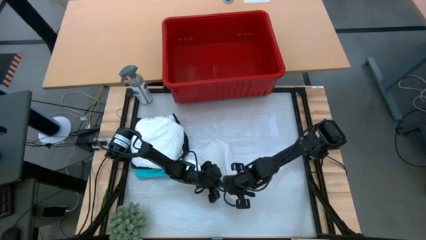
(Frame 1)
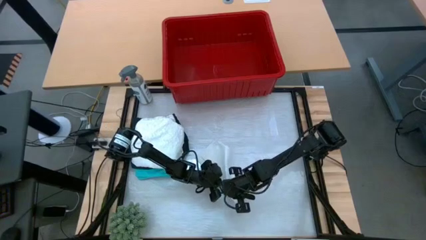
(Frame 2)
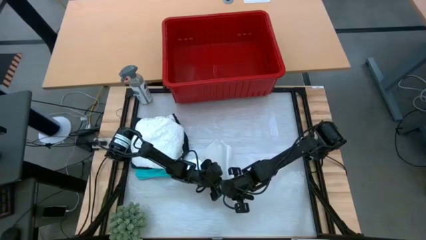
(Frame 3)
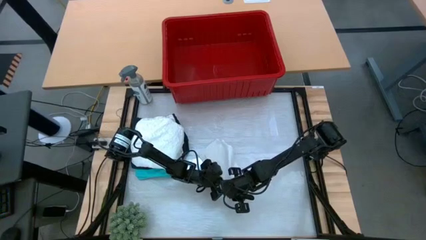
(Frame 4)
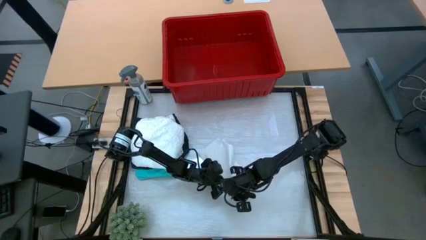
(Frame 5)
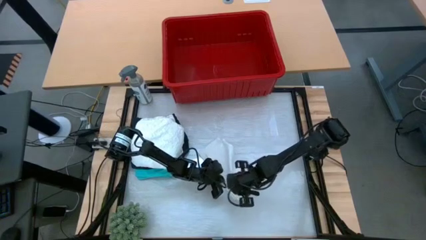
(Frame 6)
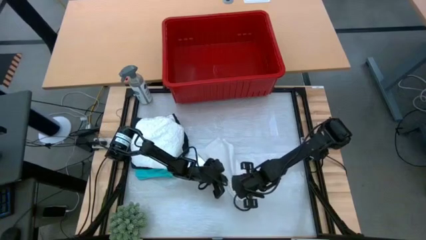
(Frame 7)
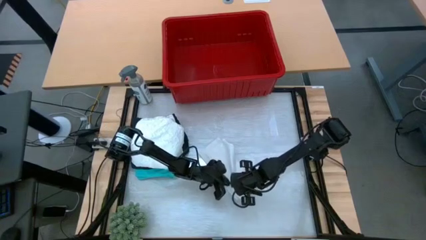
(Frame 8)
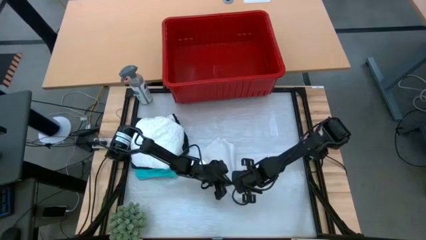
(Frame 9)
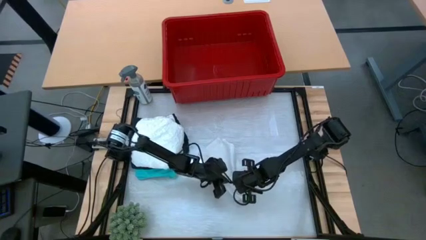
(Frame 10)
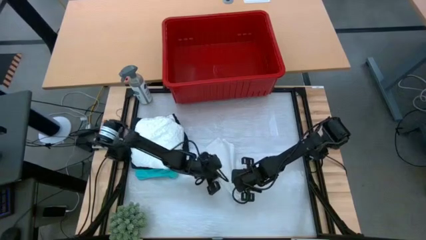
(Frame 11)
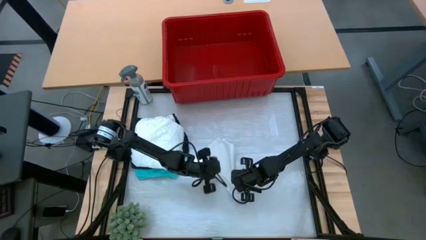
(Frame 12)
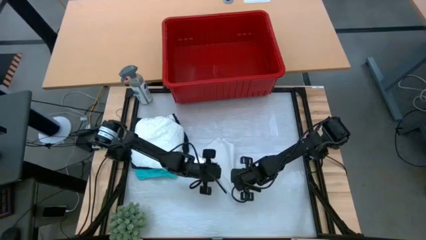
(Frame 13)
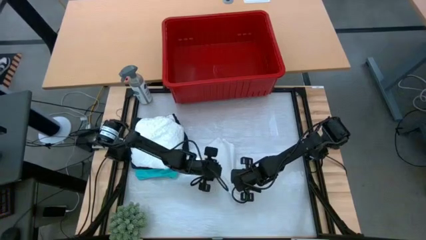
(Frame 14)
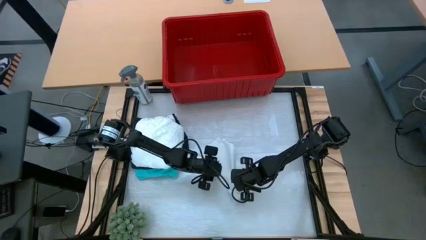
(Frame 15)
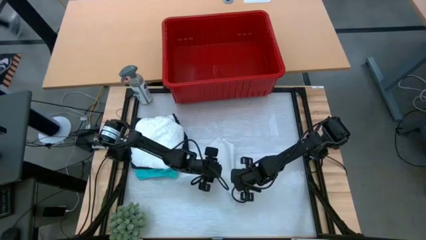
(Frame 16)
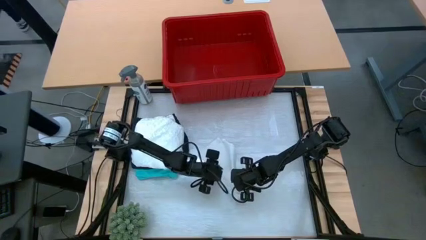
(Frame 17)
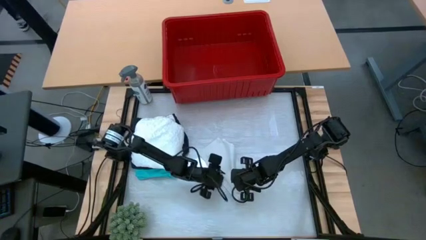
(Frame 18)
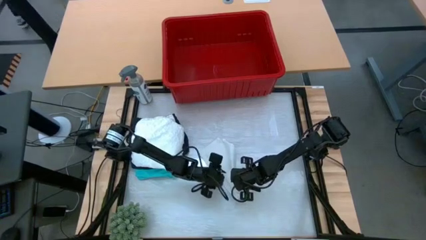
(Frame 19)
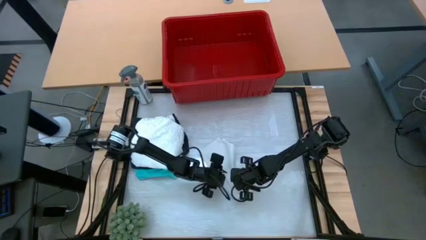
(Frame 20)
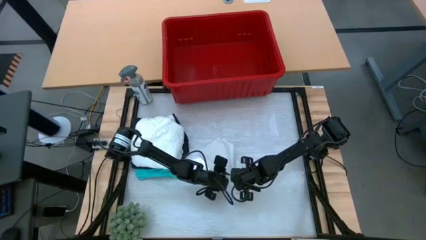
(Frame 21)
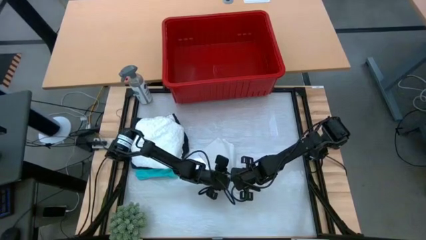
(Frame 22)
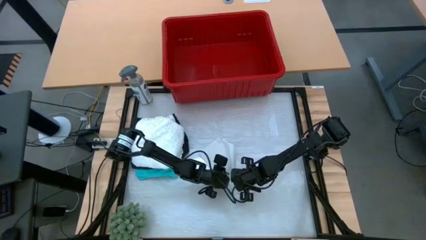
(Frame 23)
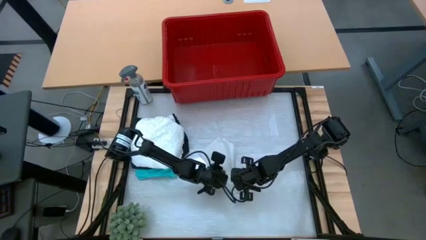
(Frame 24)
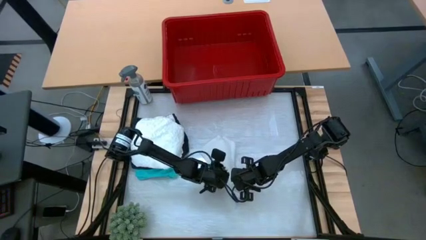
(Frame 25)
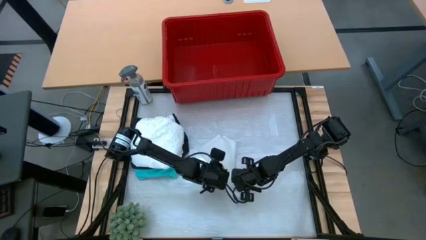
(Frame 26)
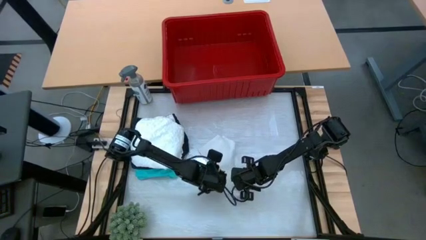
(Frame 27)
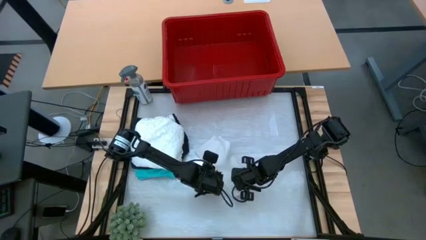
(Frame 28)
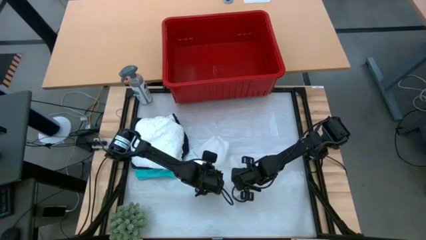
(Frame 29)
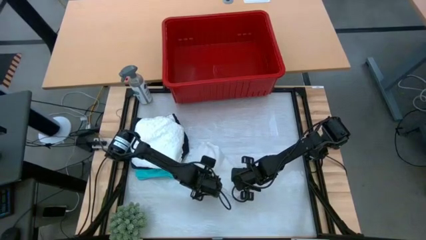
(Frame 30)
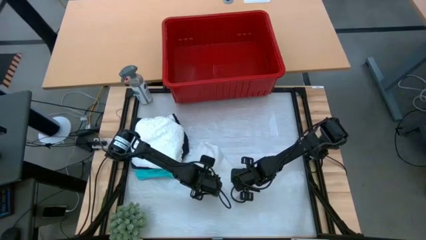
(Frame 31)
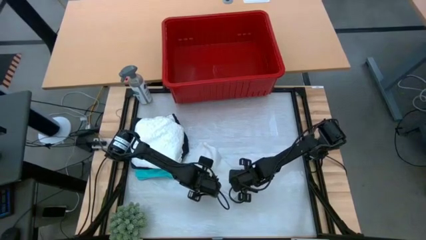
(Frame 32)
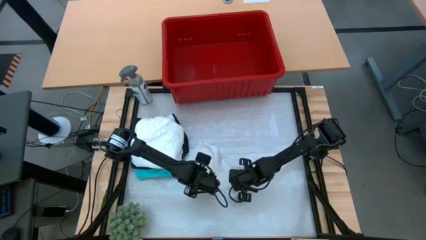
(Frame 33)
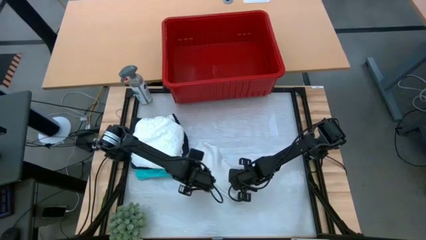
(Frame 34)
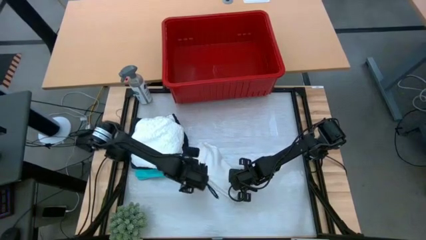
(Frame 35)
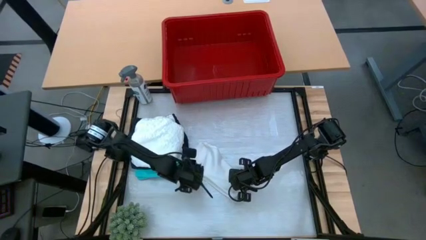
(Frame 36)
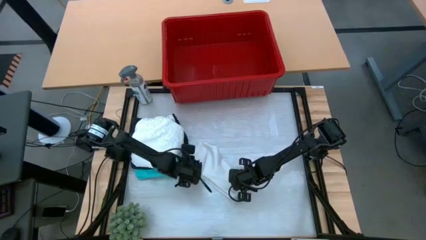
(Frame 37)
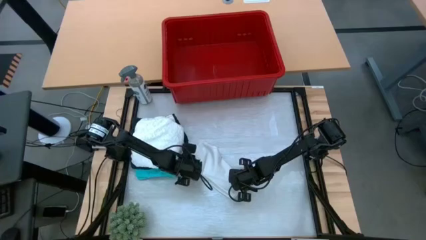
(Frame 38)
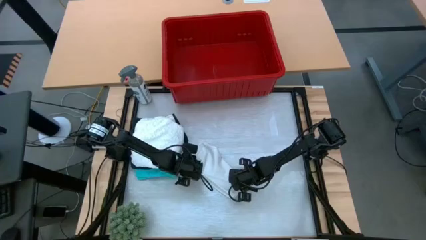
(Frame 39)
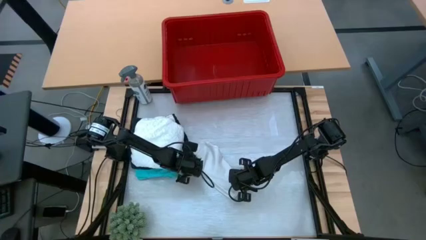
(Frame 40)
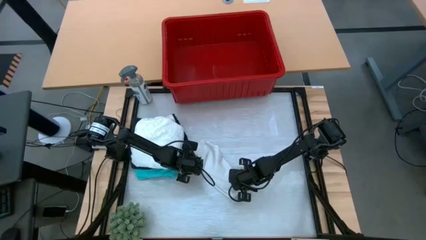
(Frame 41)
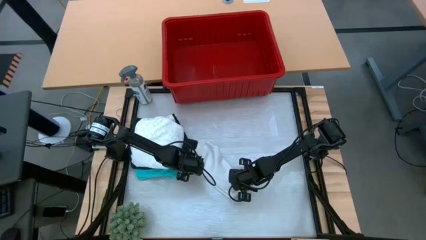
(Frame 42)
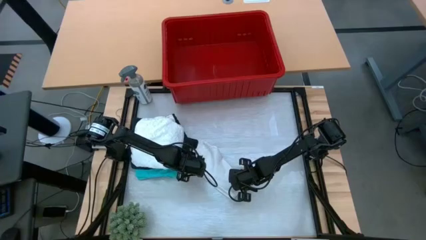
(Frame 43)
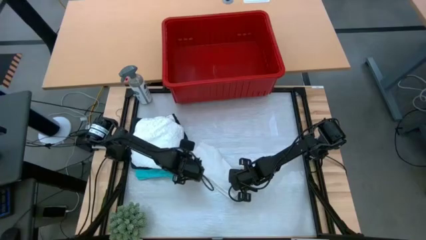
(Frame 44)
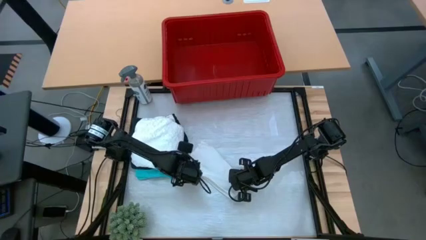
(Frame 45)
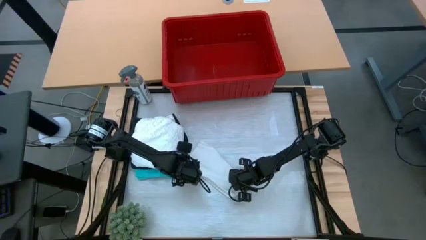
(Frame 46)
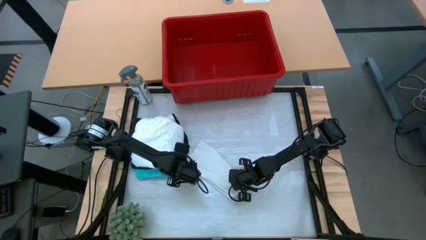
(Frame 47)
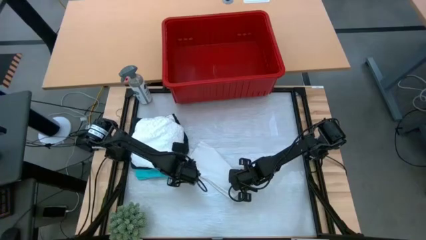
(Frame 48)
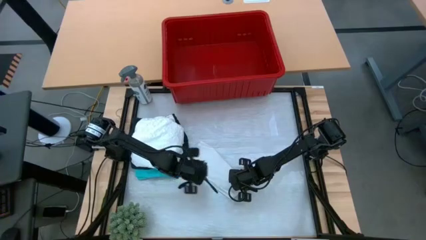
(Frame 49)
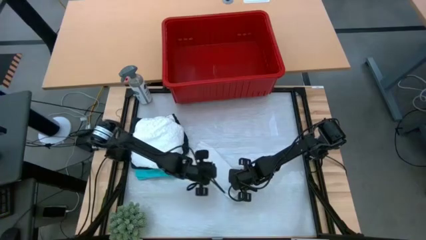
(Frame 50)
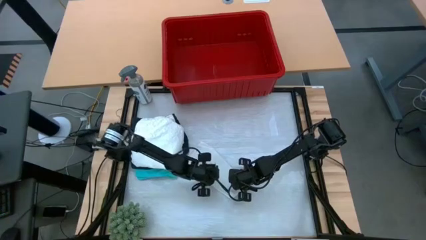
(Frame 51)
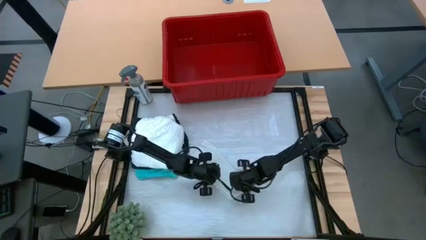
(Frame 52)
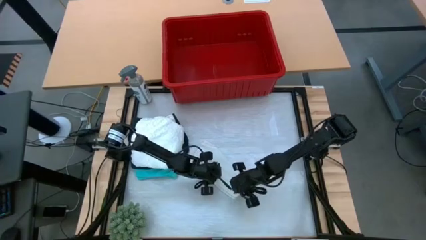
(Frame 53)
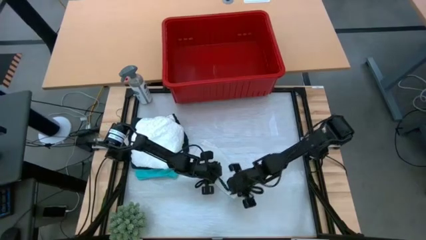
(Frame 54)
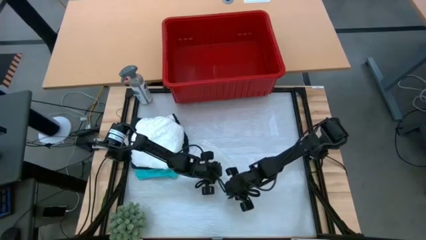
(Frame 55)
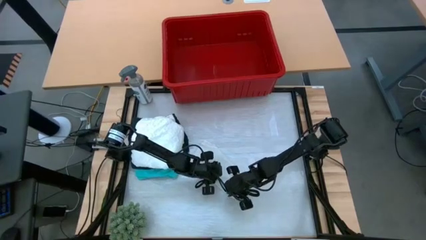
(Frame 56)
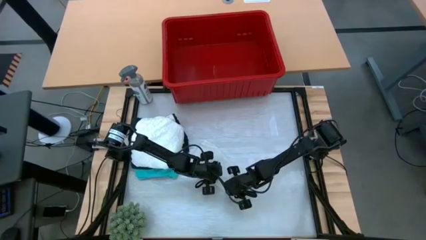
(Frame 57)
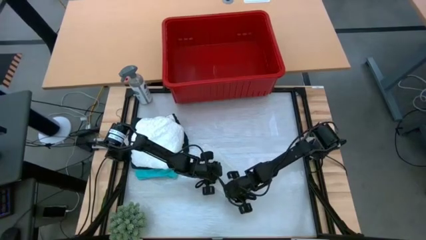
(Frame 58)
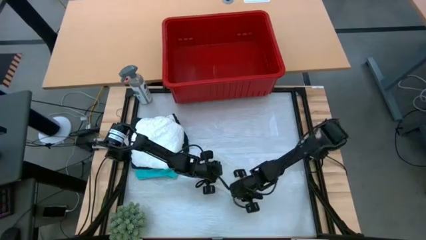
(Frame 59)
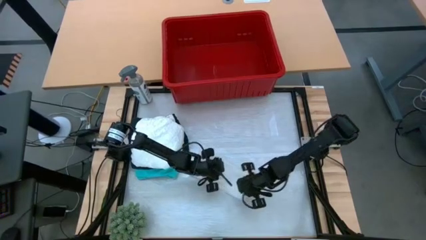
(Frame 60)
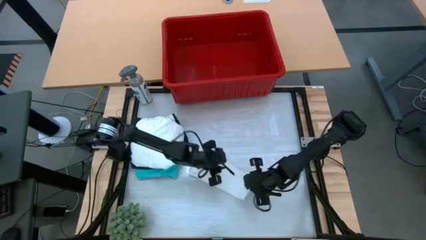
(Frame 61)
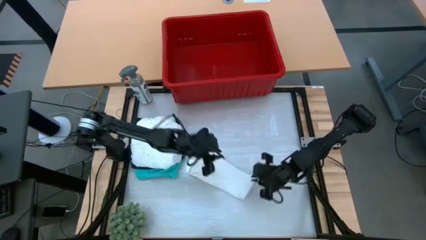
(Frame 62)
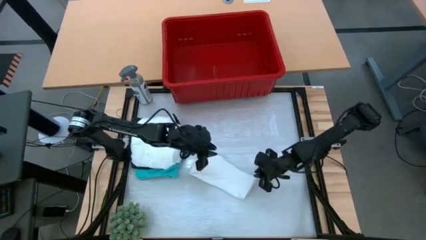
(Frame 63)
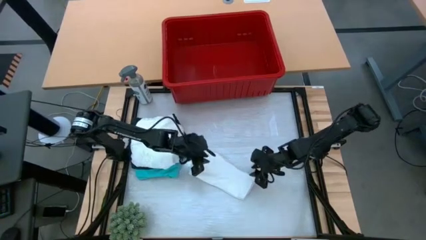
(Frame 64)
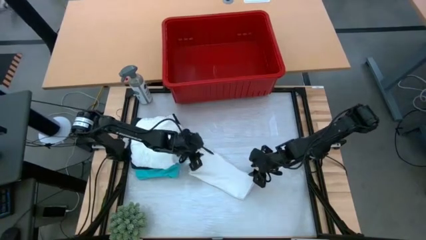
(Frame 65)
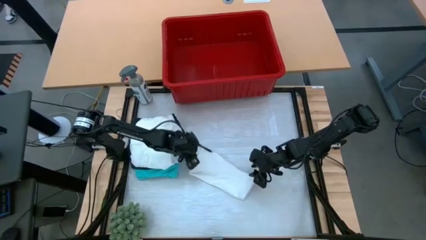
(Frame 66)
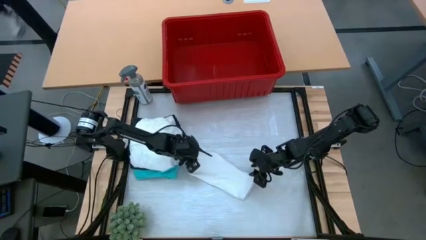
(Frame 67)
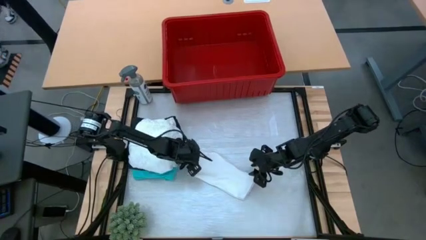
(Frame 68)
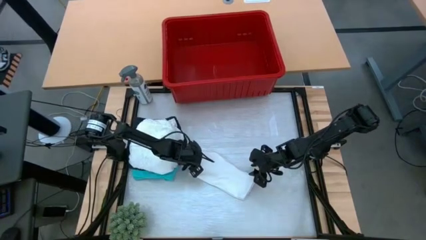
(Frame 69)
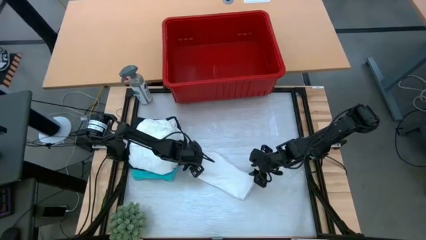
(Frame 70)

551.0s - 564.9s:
Task: Fold laundry
Fold the white shorts

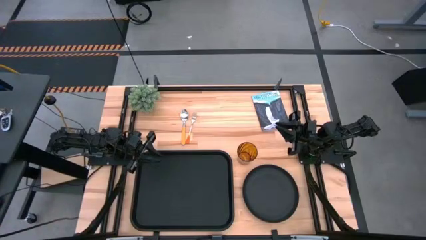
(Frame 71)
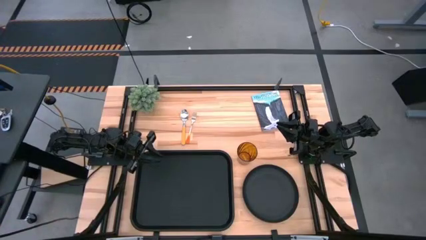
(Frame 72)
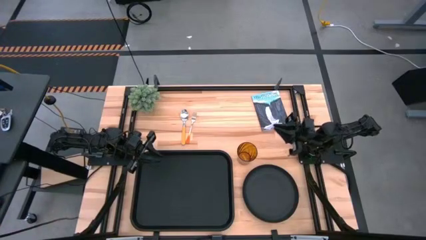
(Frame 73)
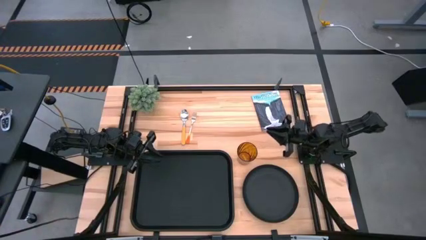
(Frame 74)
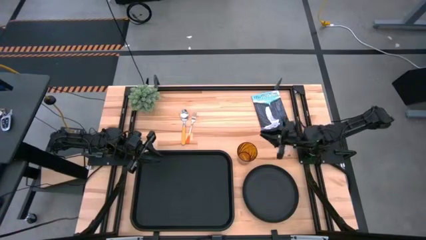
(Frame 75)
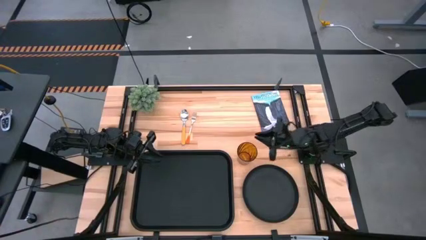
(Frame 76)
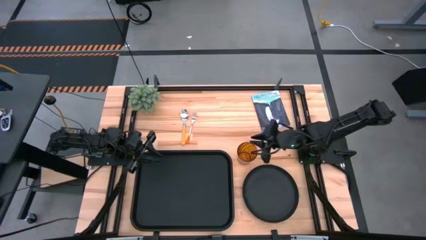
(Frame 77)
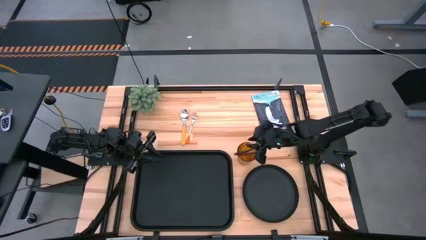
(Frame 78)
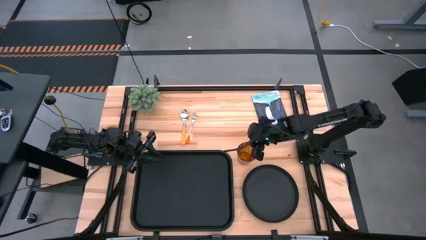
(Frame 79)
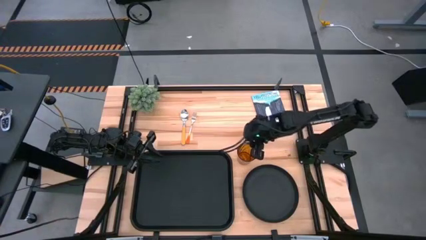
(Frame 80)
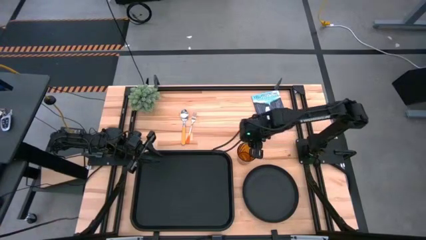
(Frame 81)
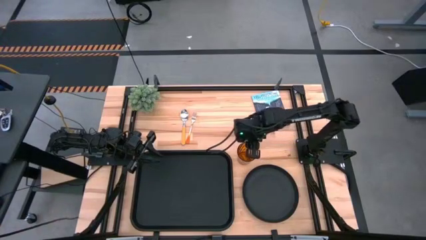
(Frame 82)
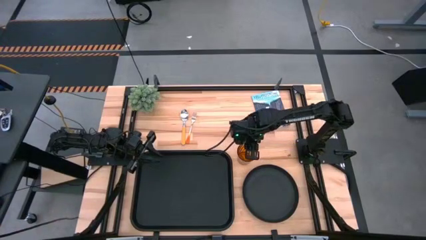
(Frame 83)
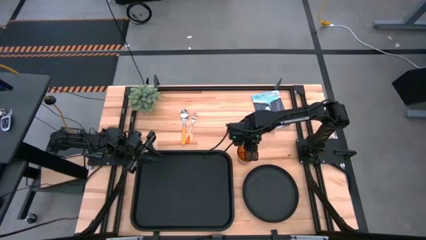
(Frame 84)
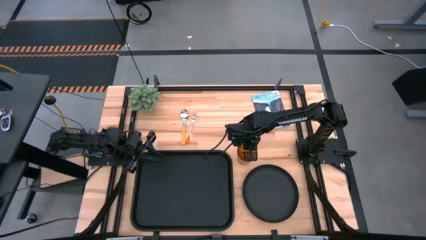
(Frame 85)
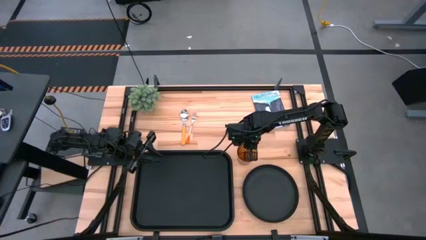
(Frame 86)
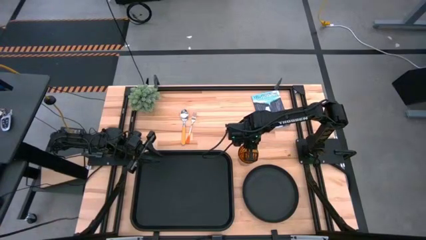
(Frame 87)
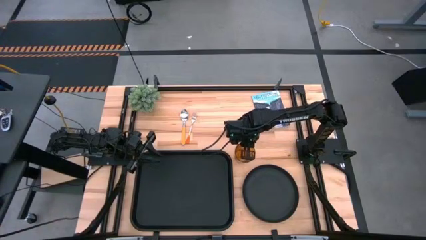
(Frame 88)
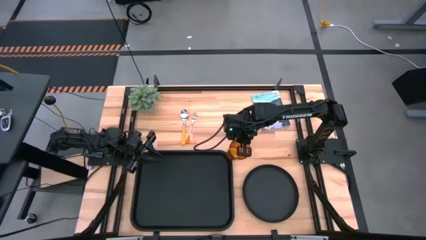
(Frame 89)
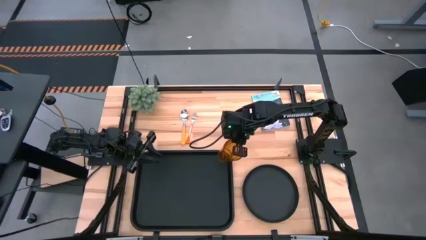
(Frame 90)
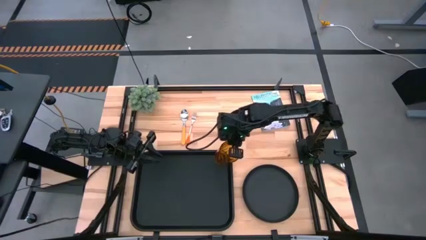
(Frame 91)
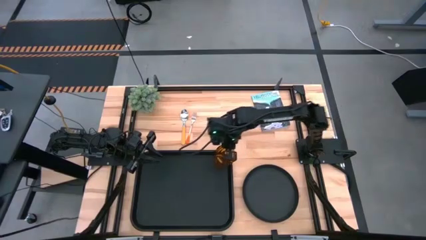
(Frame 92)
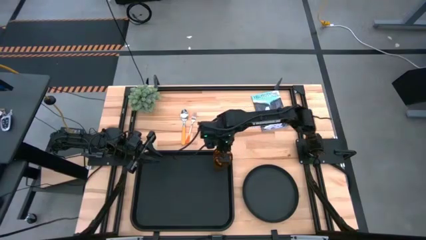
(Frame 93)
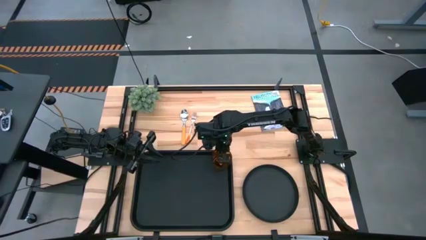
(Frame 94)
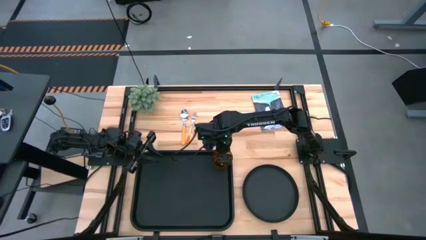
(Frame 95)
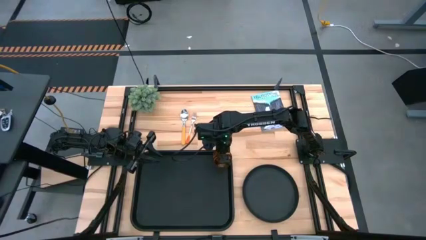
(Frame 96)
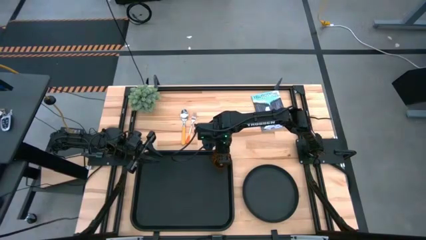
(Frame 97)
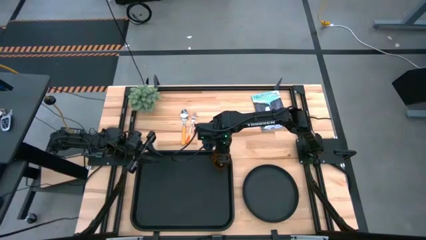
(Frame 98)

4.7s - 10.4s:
Task: Pick and place plate/cup/fork/spoon on tray
Put the brown cup on the black tray
